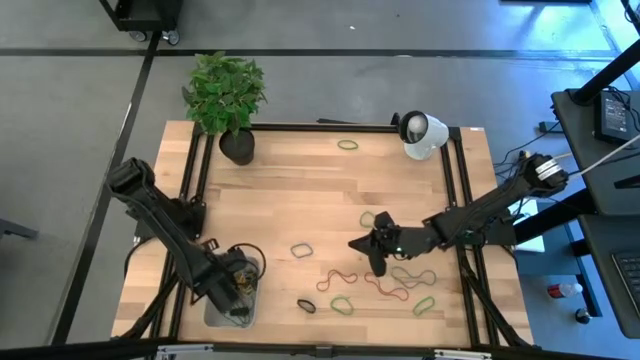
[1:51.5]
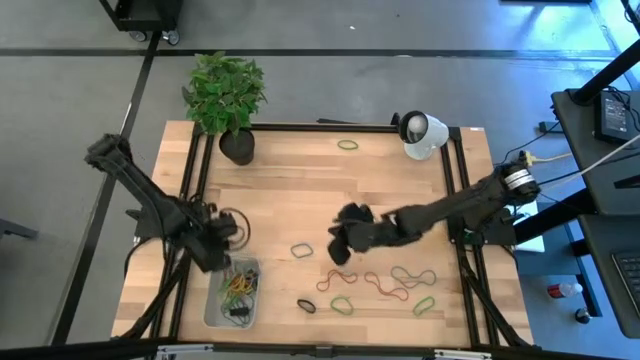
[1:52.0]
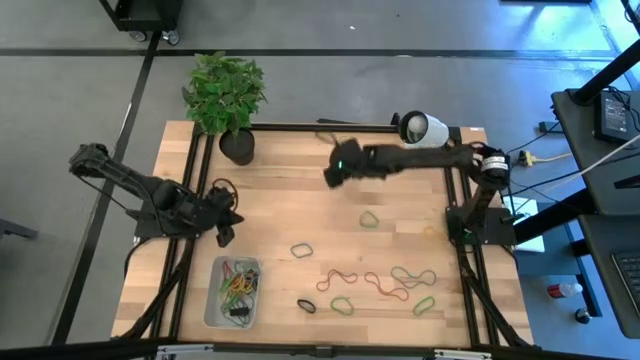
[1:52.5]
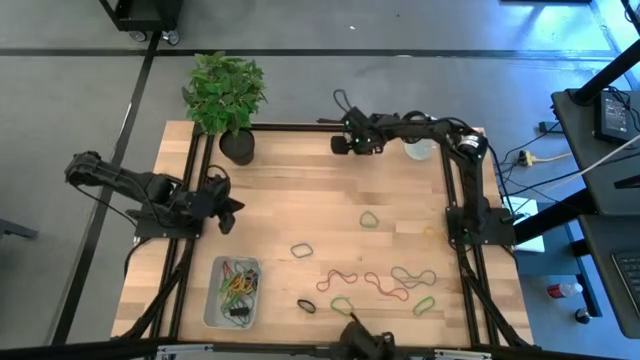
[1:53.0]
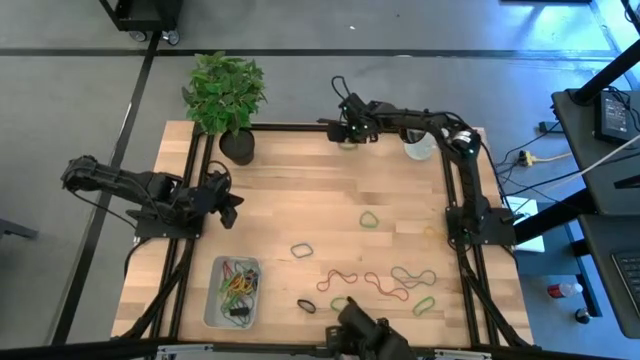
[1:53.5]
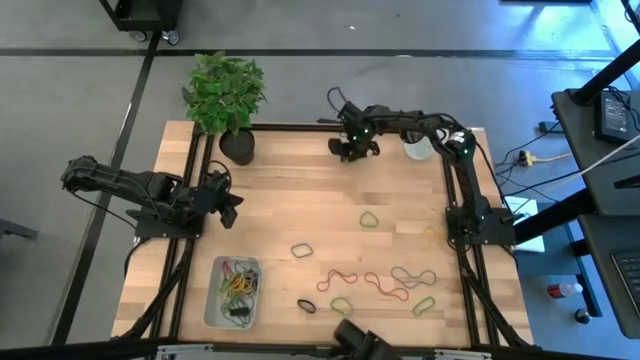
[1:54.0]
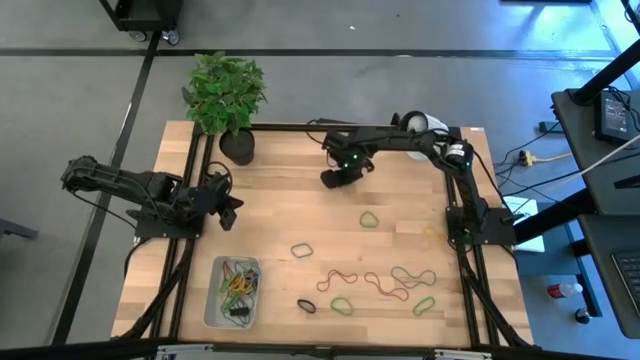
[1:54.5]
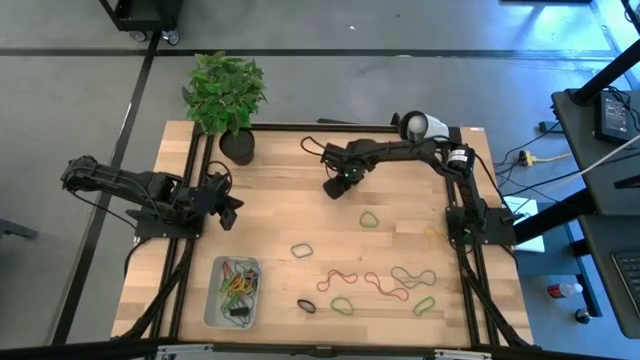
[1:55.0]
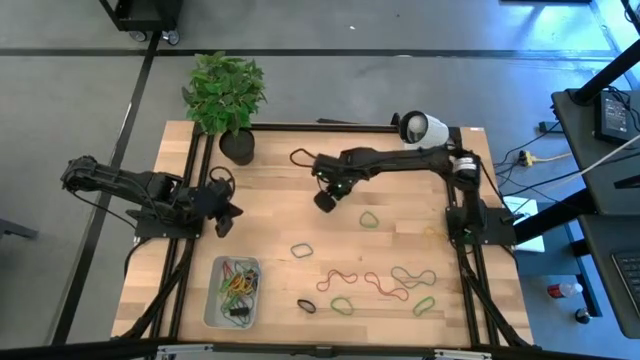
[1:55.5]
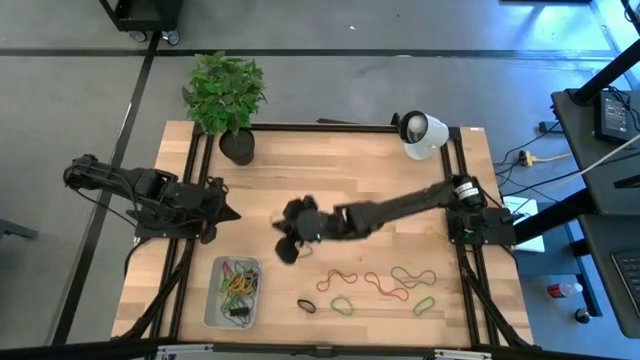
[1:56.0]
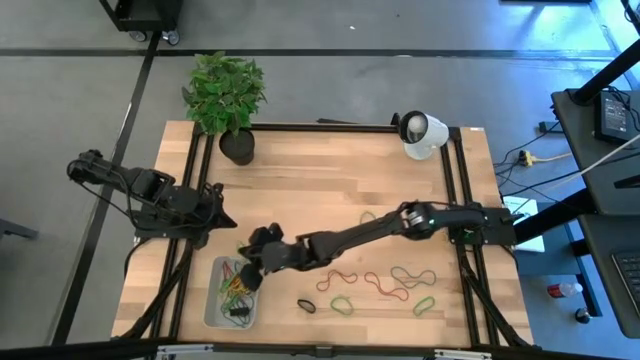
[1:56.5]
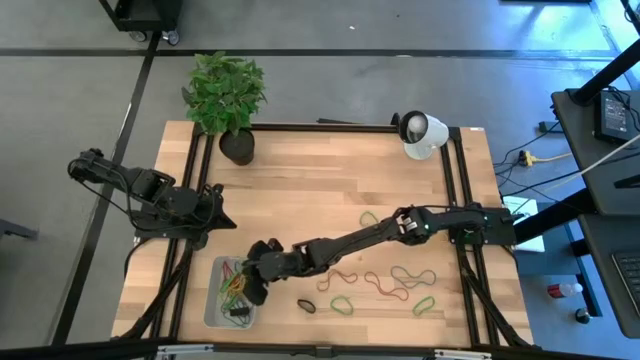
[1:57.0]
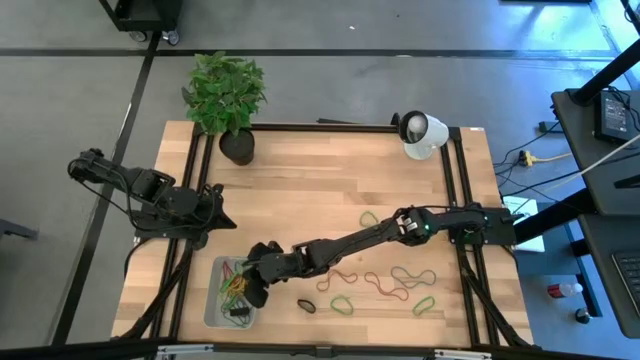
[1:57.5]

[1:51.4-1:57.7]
Task: Pick and place rubber bands into bin
Put the green rubber band into the bin

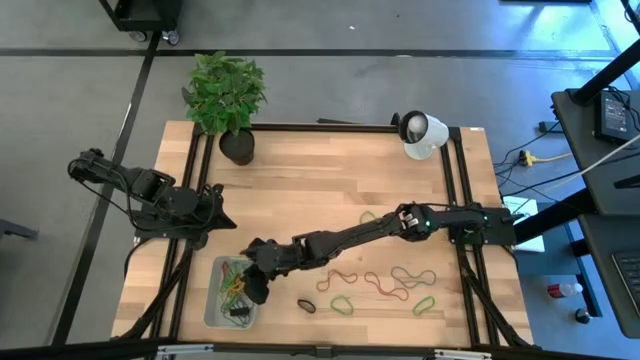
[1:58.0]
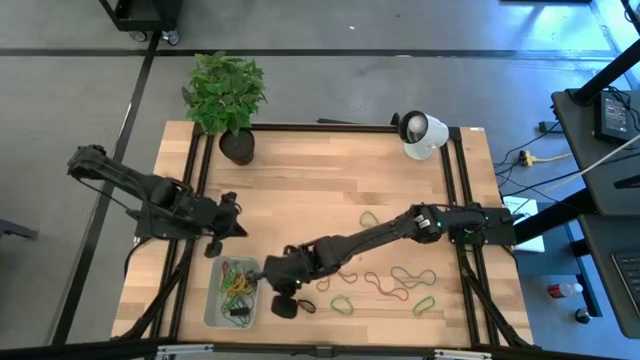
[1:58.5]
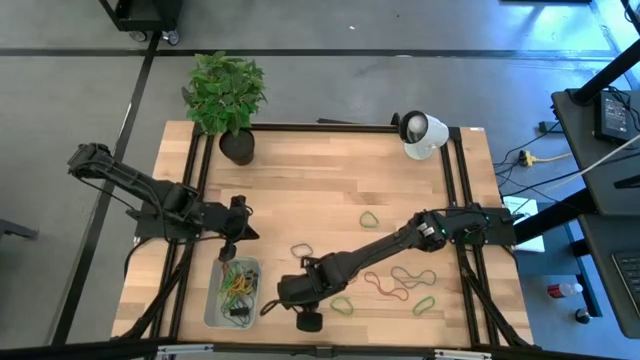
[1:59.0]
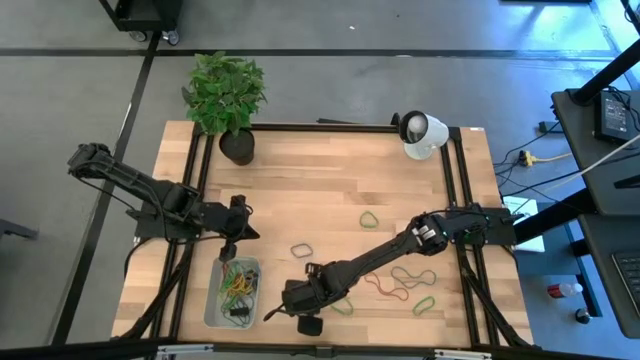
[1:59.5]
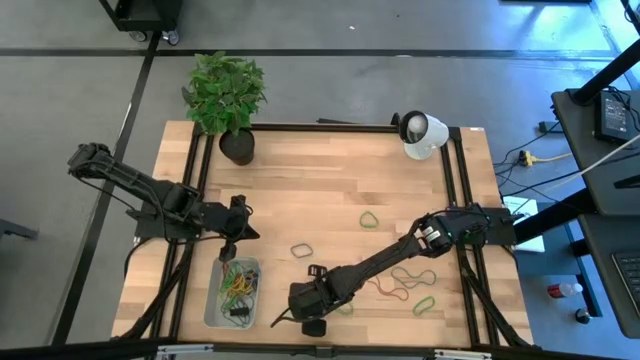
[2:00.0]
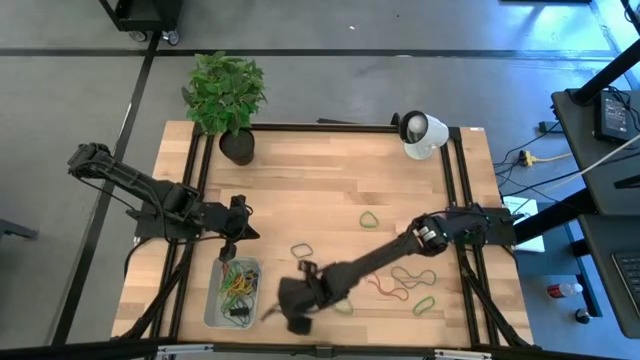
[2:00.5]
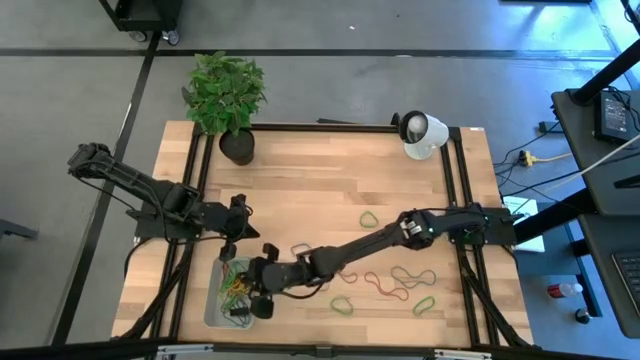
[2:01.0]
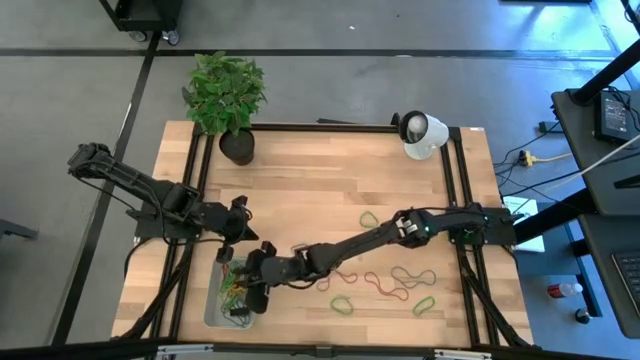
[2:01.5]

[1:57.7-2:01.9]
Put the black rubber band into the bin

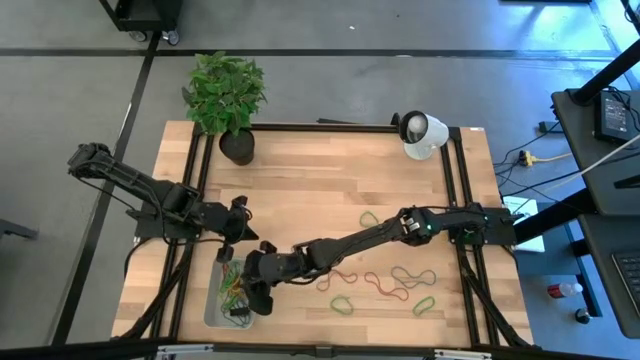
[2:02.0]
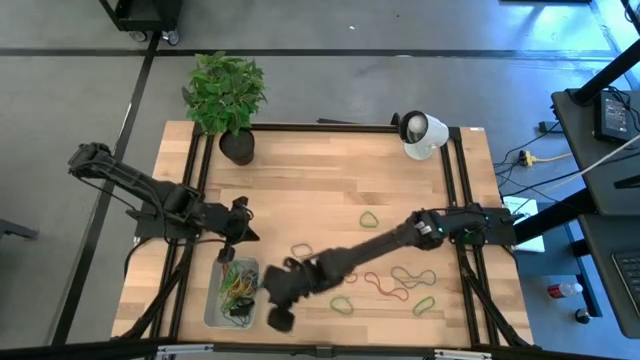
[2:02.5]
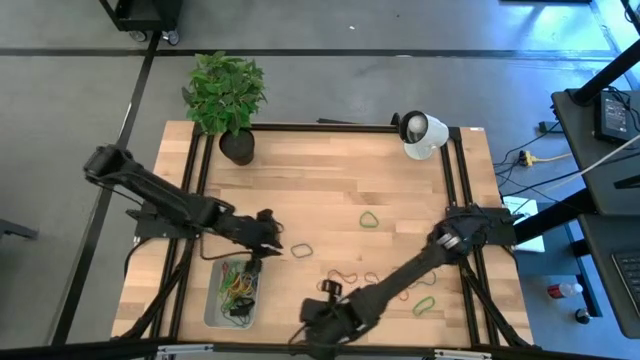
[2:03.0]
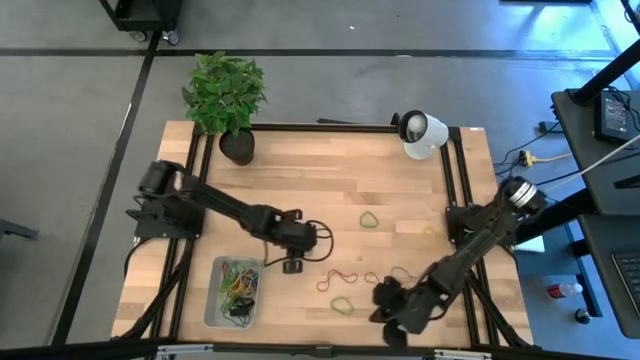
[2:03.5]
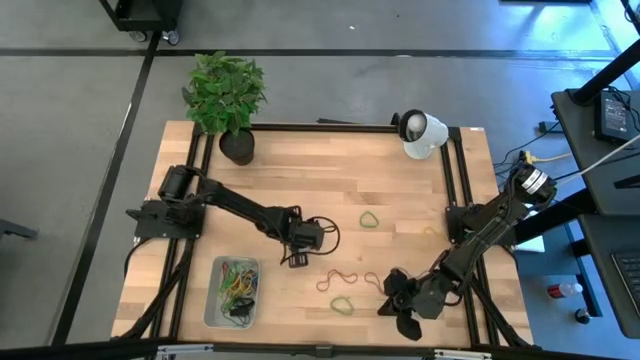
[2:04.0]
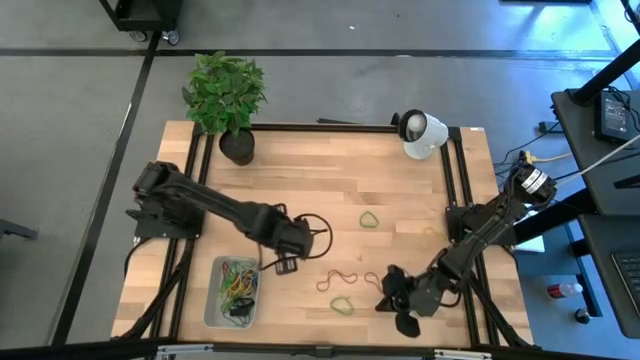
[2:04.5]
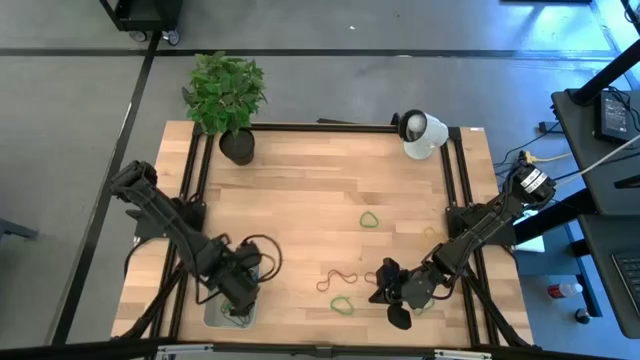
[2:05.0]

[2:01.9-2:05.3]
Put the blue rubber band into the bin

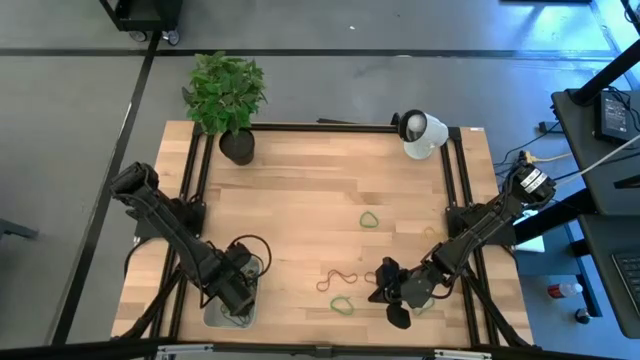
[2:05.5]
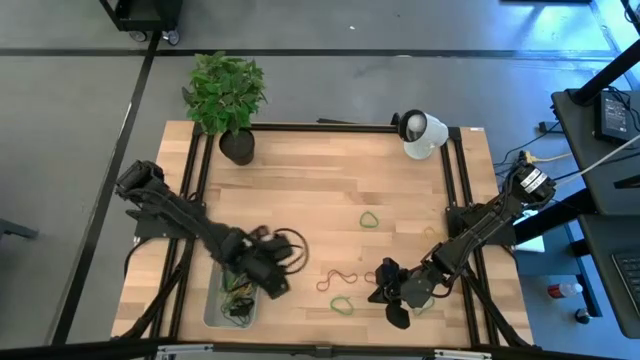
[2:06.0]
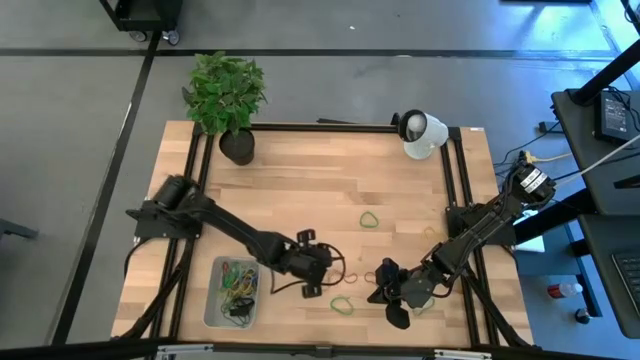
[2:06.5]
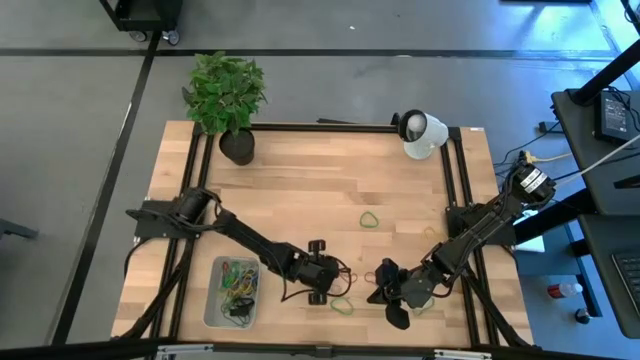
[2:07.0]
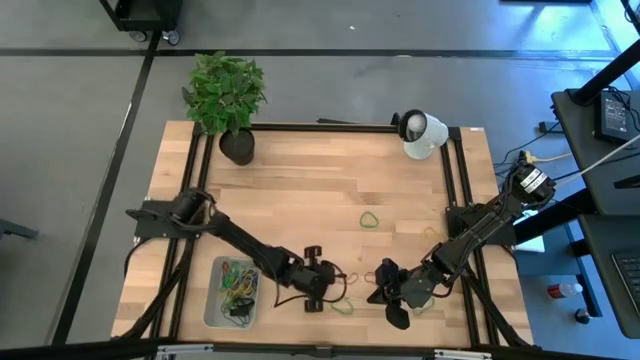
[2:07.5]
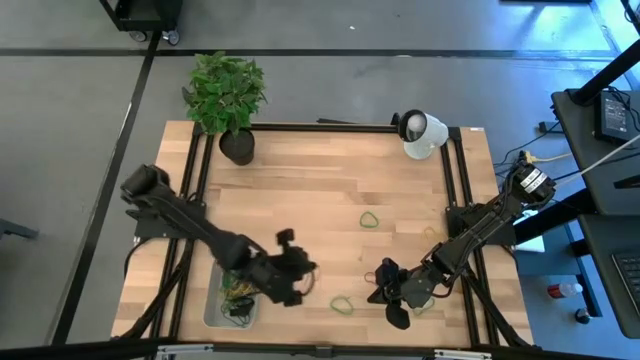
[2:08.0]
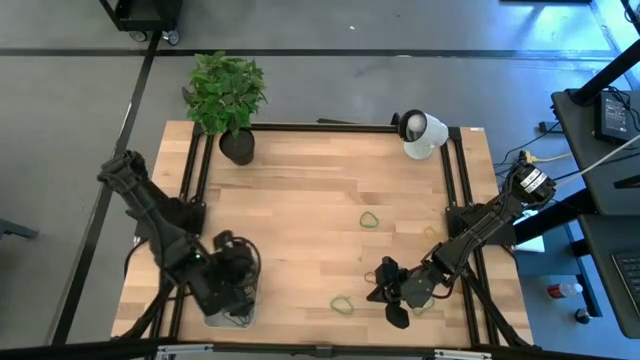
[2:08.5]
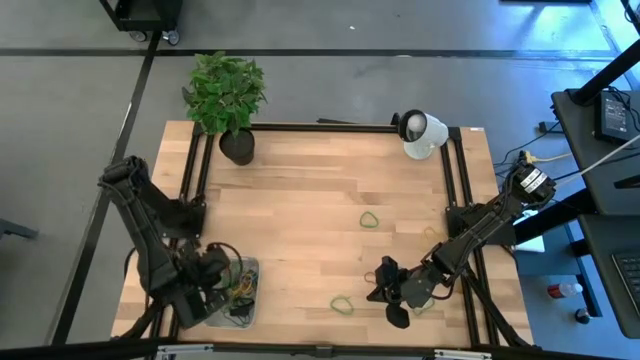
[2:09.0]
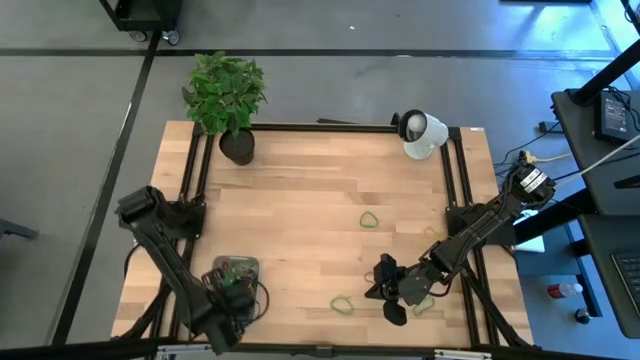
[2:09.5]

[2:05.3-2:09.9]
Put the red rubber band into the bin

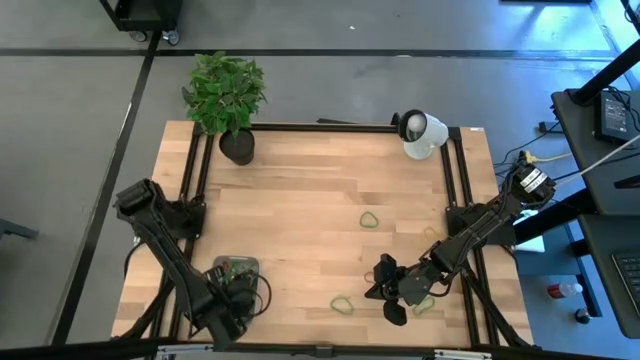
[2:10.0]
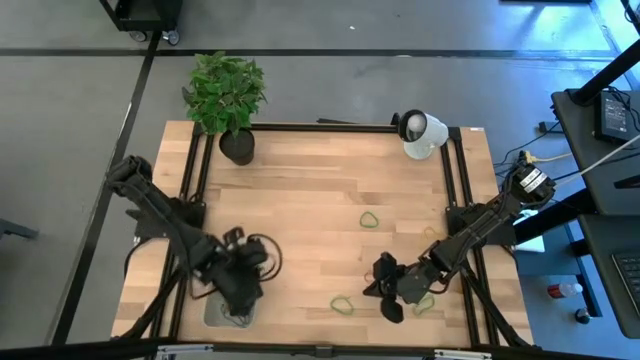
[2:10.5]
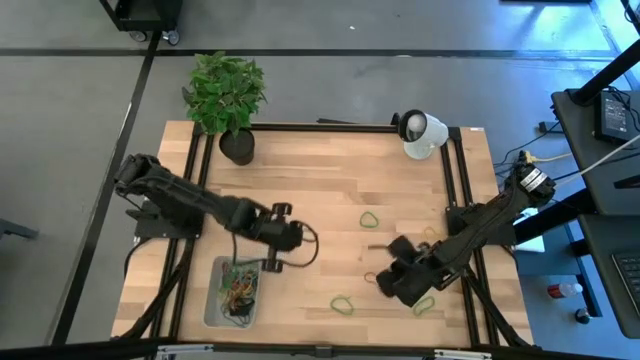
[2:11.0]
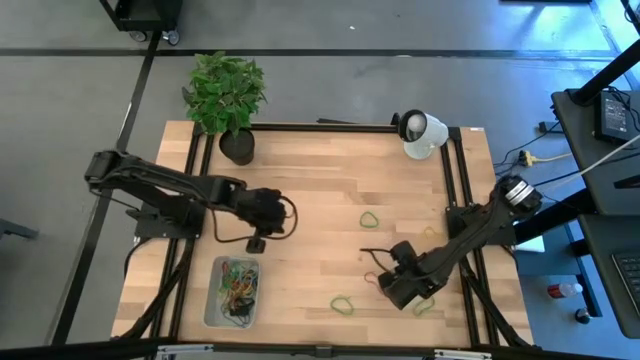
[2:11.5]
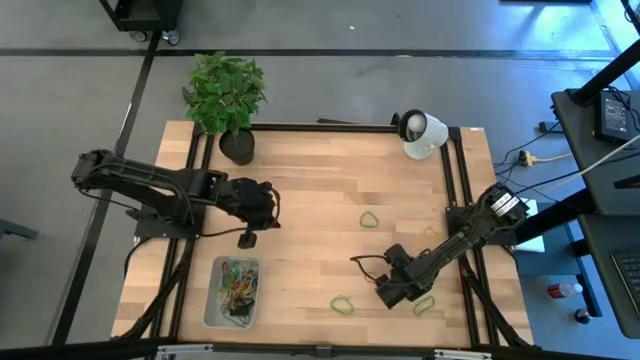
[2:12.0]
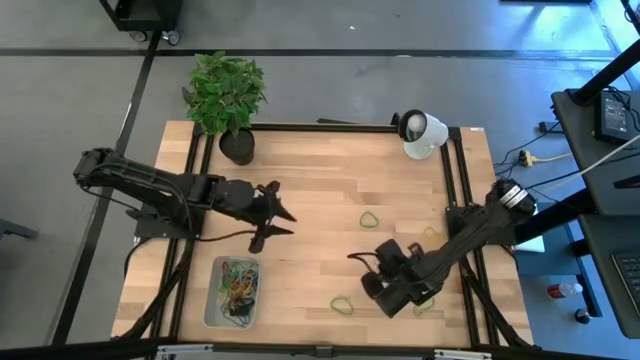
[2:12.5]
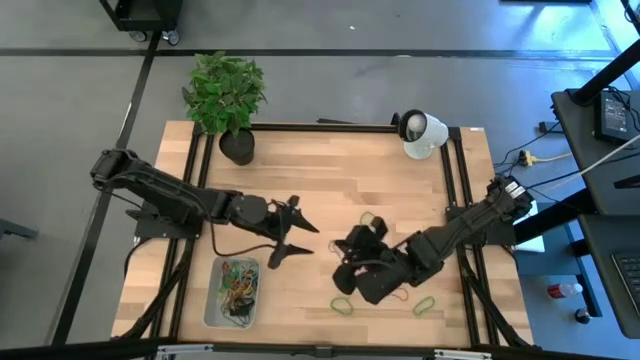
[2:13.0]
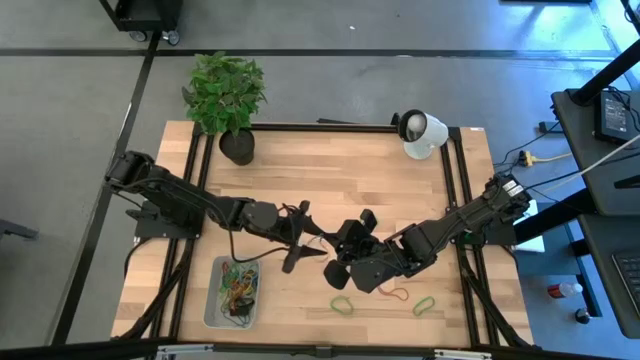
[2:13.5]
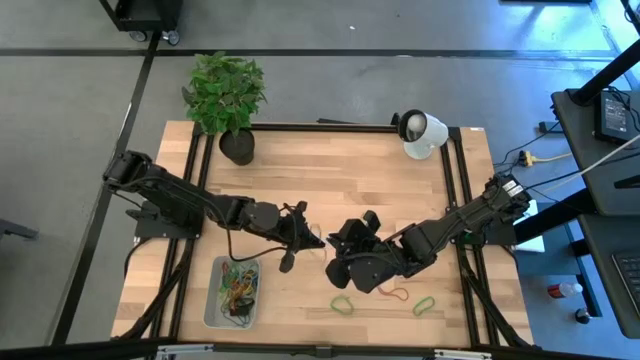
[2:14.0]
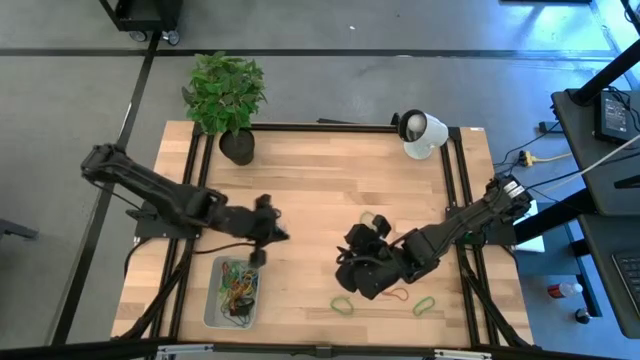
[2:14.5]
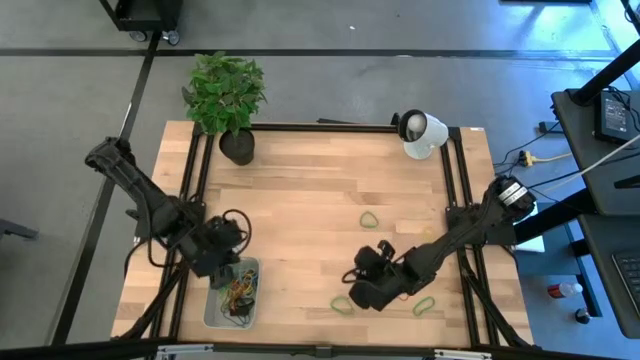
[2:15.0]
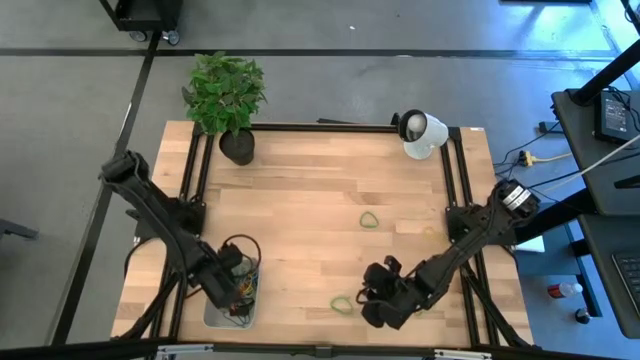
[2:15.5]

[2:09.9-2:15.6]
Put the blue rubber band into the bin
